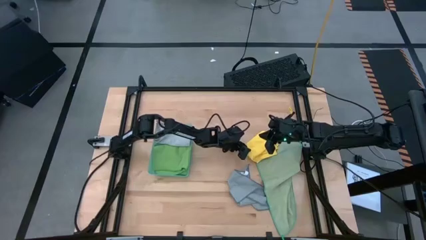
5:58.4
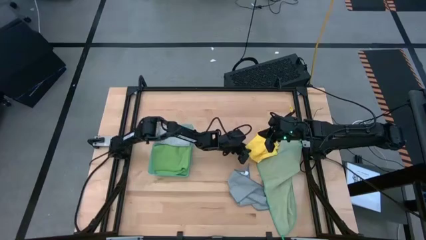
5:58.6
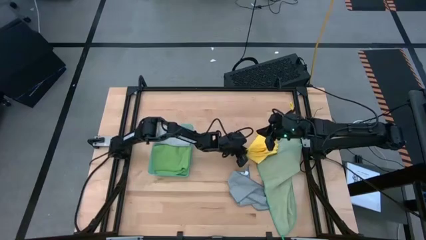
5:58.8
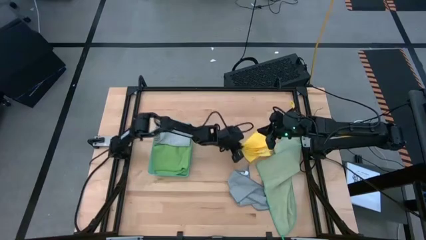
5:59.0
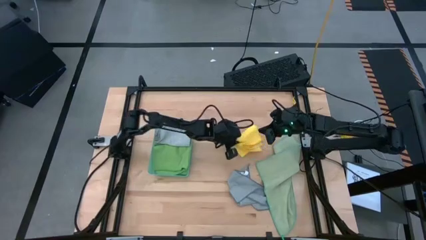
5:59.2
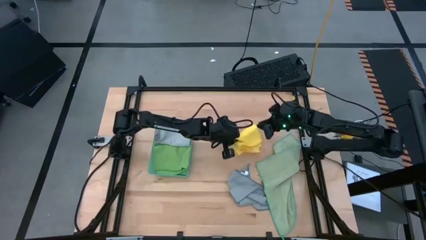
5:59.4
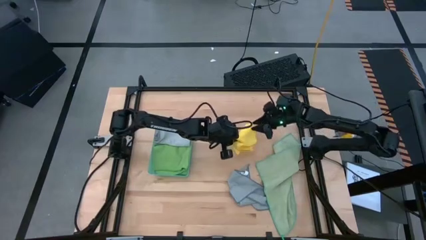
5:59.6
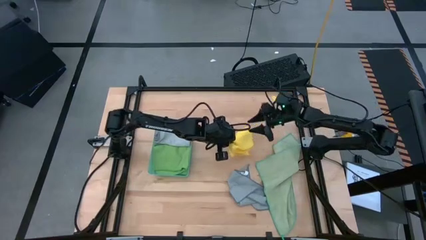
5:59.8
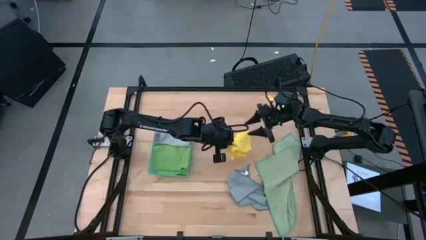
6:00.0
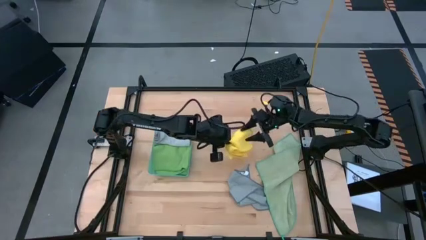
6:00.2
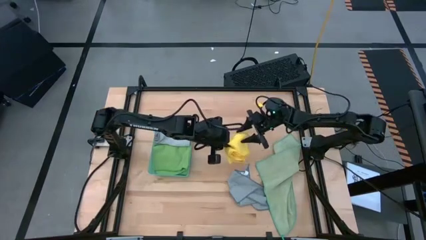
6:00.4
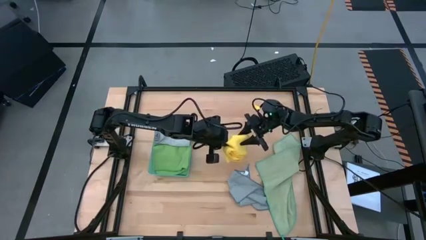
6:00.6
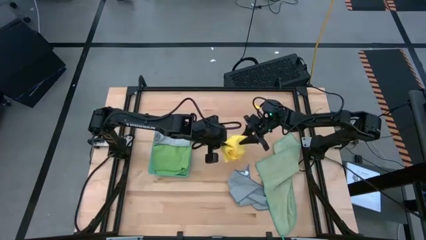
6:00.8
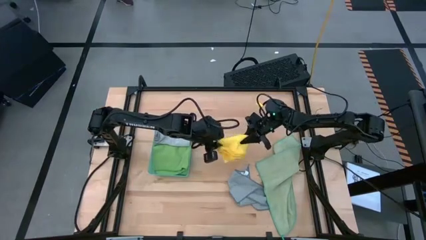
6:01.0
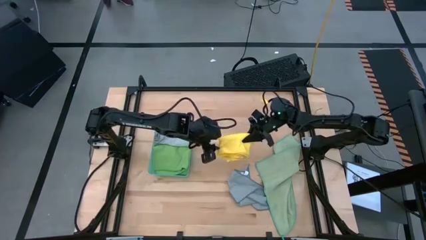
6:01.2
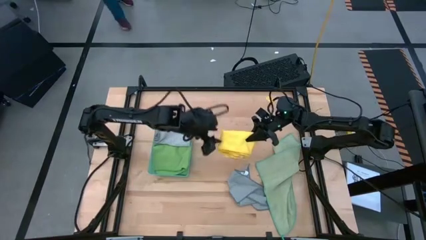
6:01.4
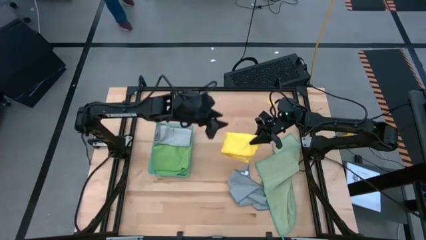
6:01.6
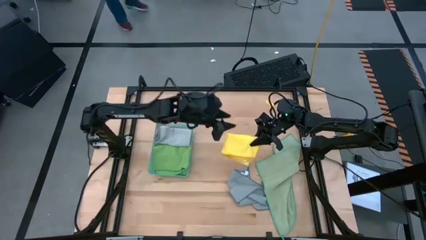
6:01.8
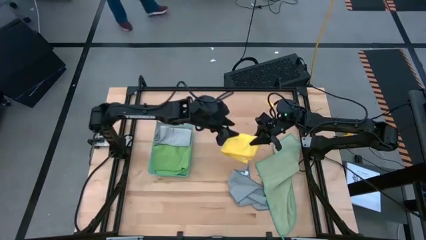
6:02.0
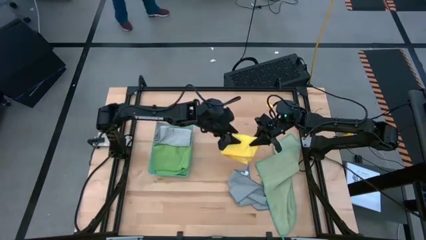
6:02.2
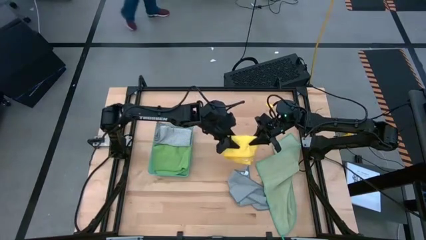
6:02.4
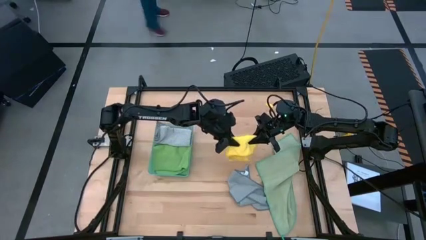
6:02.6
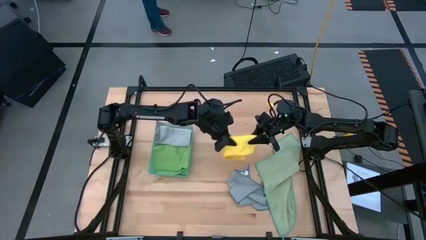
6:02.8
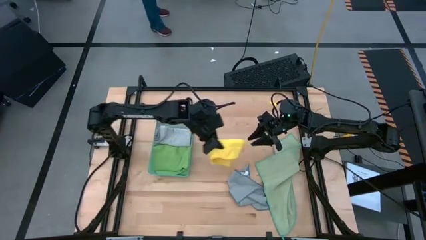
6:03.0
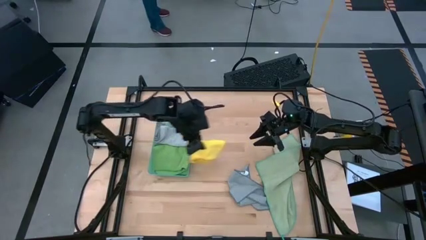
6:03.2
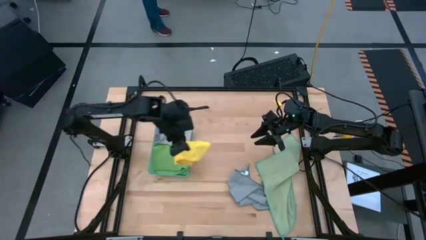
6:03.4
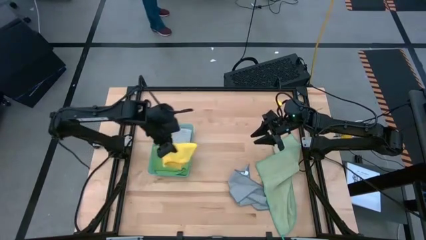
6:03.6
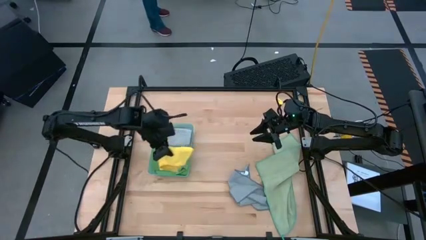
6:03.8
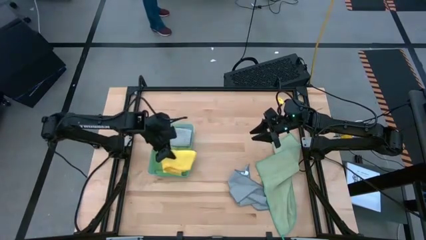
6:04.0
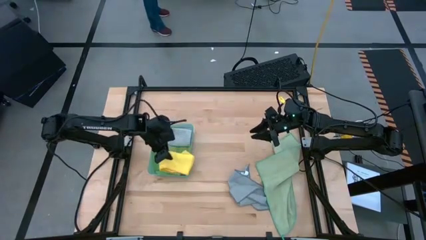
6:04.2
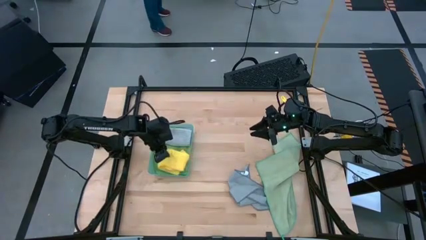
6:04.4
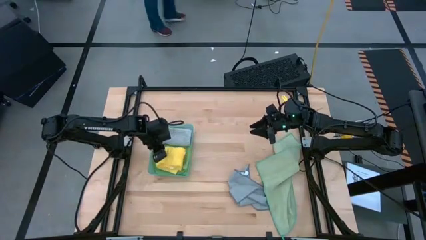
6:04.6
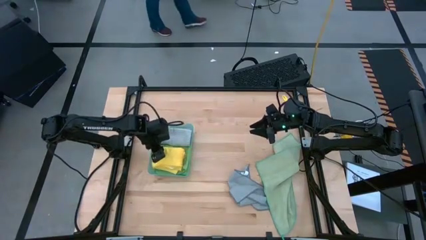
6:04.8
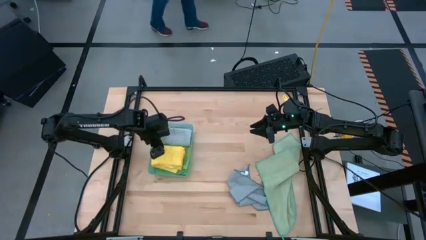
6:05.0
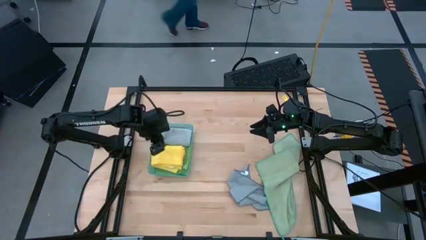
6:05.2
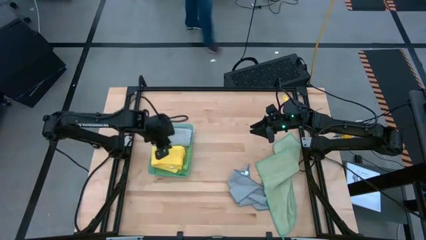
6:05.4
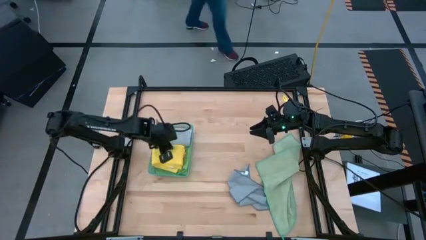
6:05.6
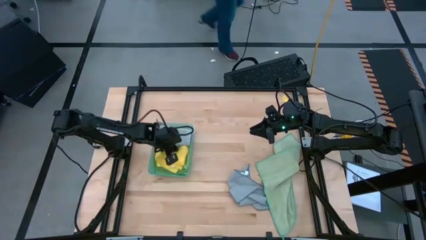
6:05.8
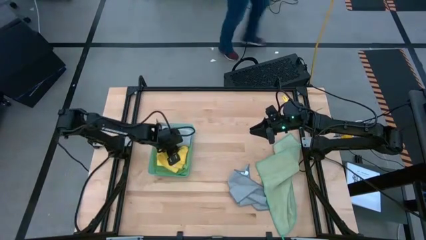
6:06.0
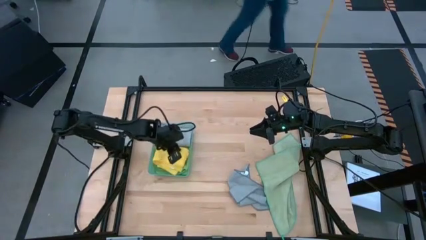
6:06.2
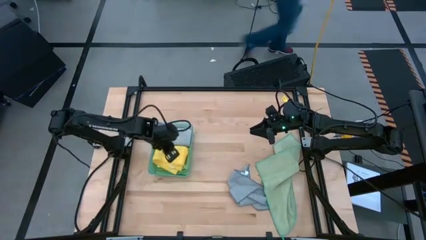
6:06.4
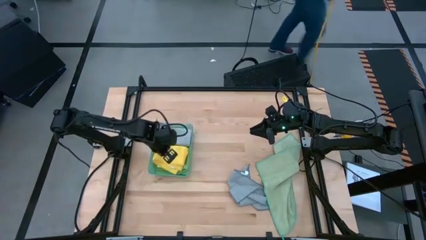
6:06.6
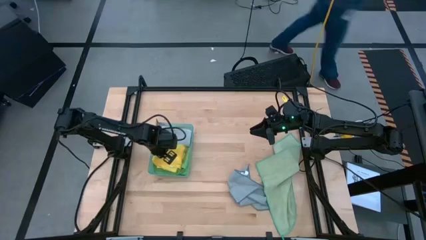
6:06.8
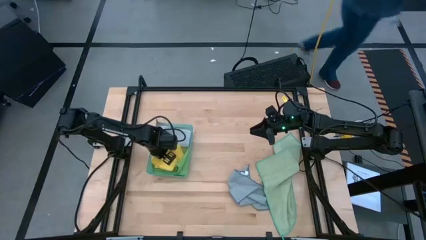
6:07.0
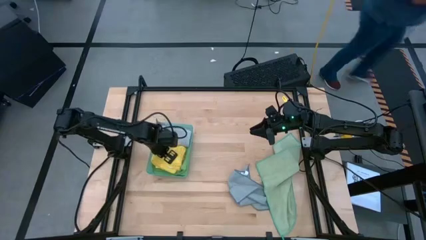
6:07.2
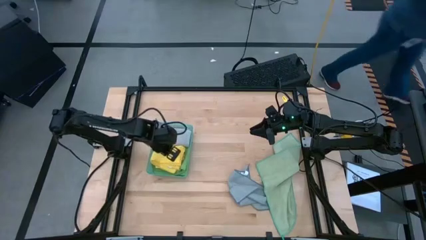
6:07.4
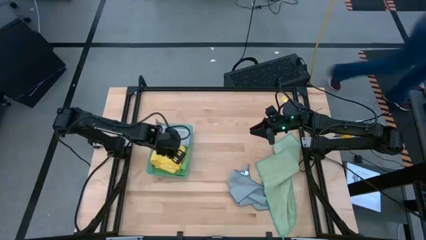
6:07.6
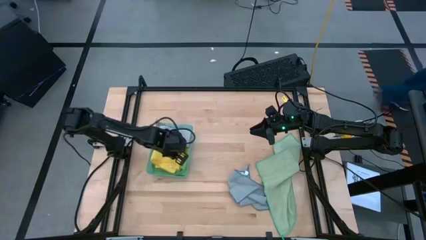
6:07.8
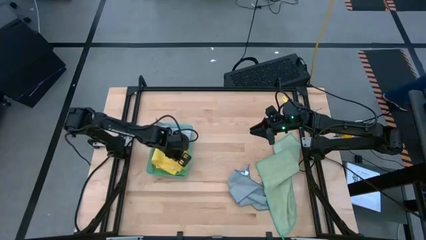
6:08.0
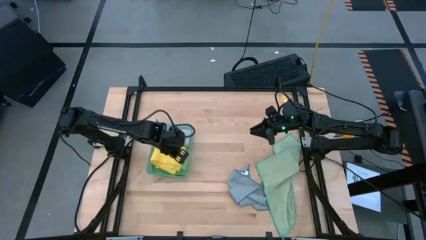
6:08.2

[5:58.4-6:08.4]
Task: Fold microfiber towels
Put the yellow microfiber cloth into the green bin

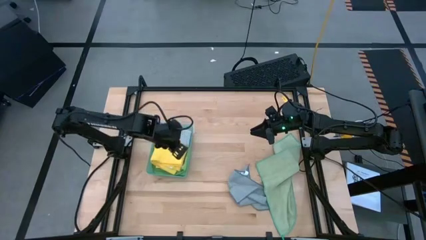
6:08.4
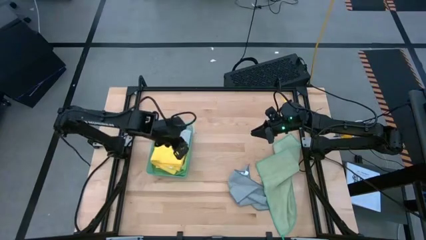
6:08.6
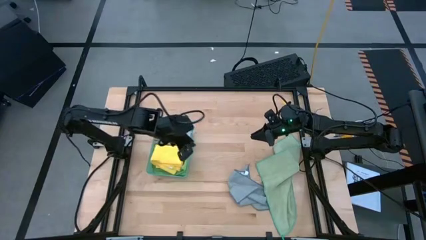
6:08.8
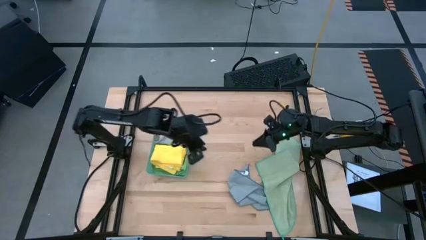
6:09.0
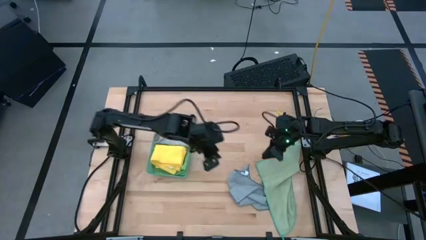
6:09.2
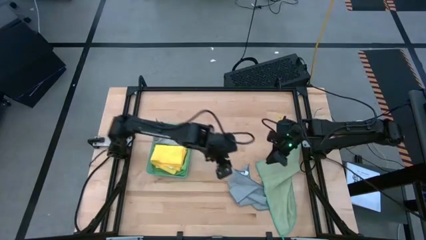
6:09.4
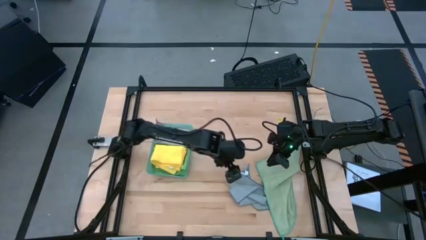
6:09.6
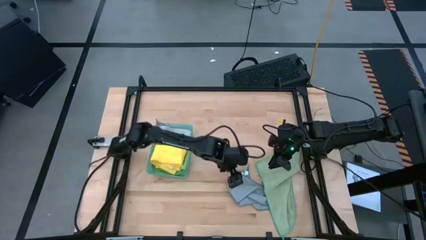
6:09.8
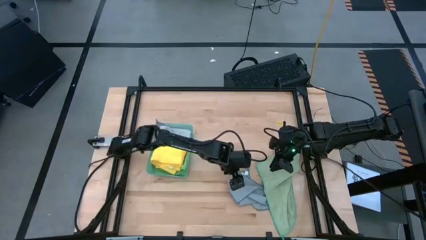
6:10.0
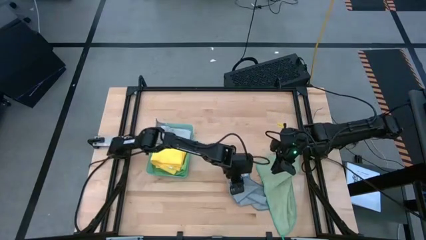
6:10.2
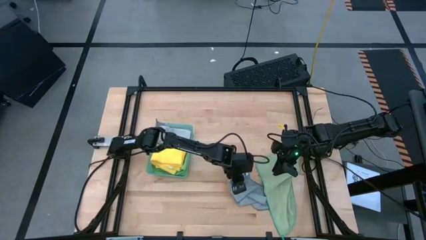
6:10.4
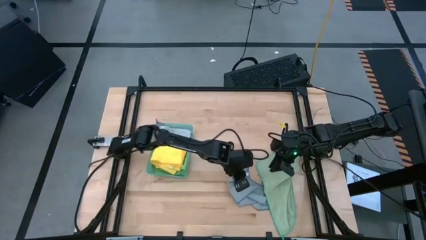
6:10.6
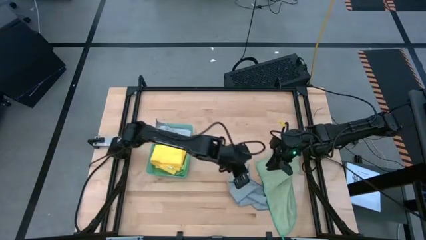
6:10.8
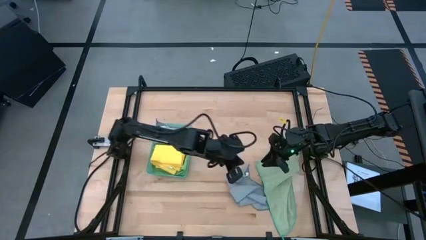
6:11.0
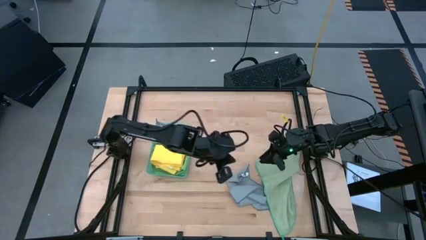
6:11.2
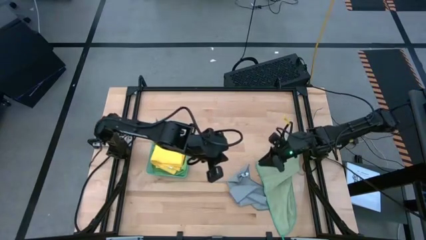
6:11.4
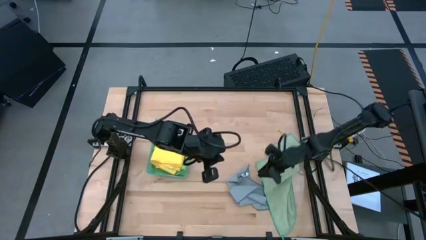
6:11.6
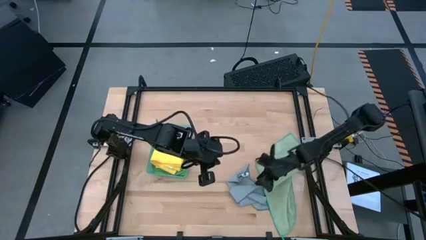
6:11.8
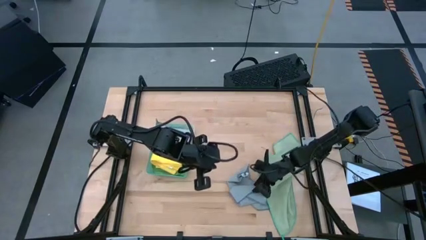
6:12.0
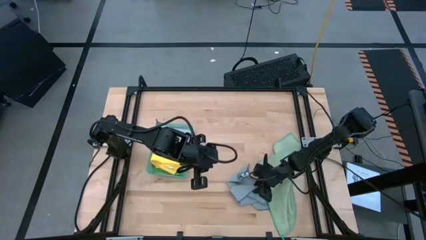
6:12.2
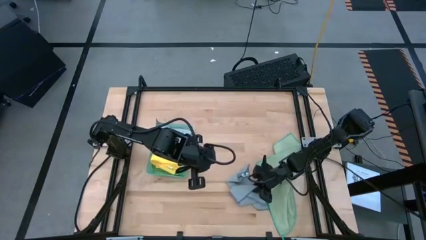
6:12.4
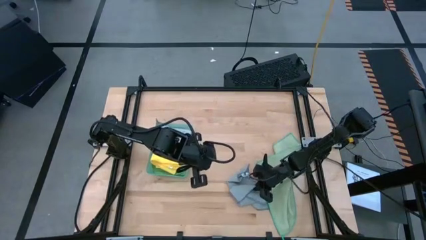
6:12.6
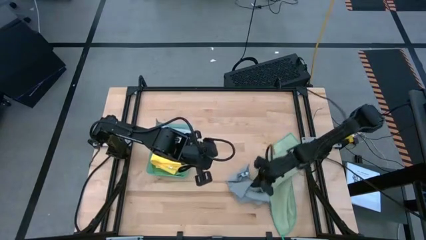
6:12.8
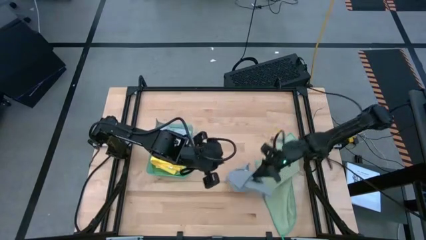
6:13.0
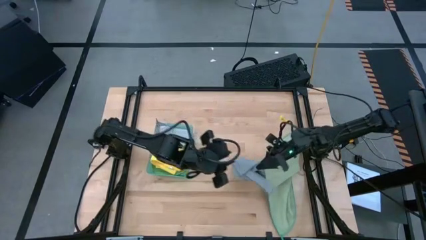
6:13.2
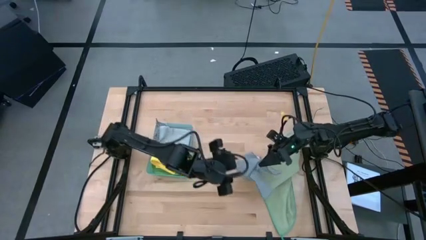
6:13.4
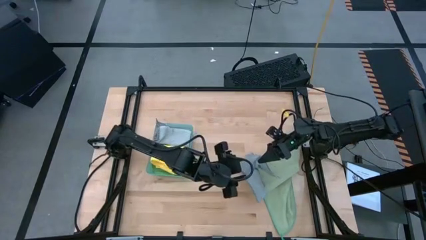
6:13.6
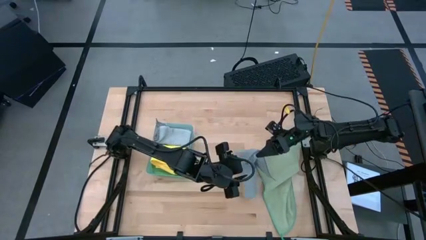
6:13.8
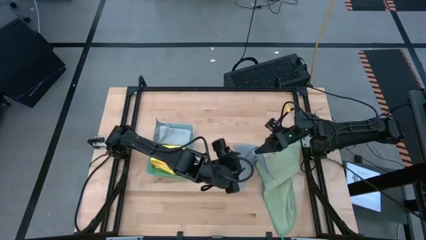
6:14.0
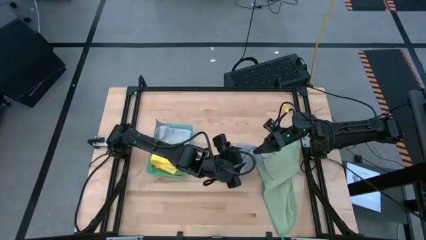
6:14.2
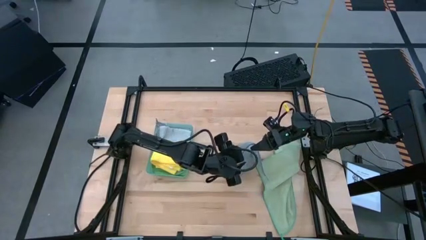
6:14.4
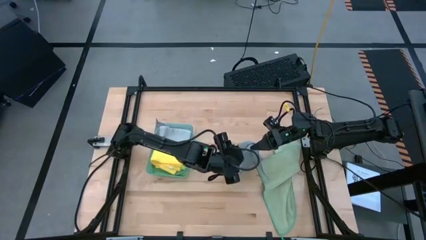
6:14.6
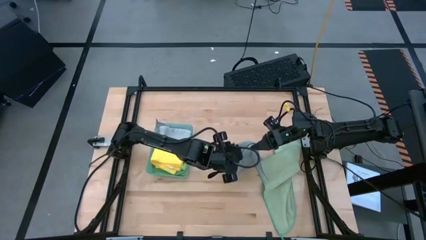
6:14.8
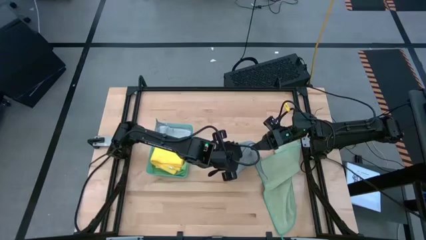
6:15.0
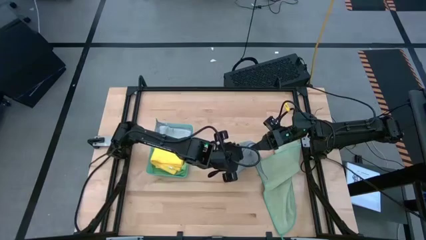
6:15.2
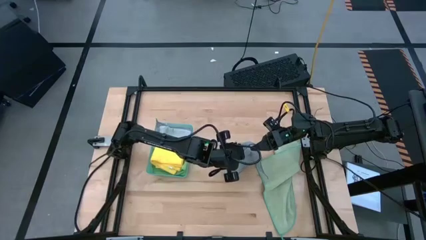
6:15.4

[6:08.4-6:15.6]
Fold the gray microfiber cloth
